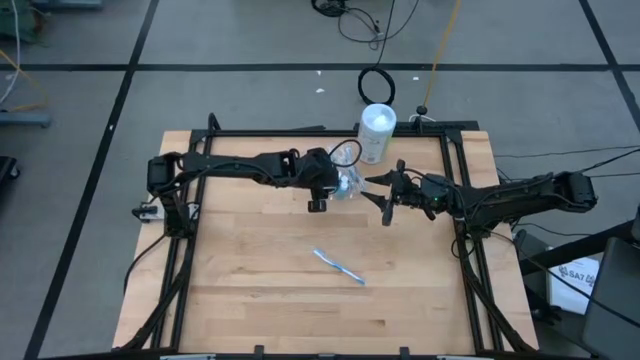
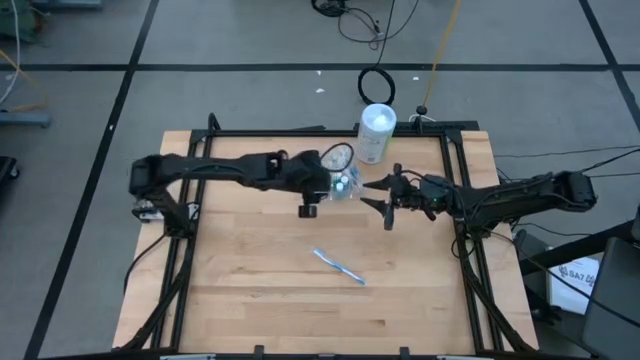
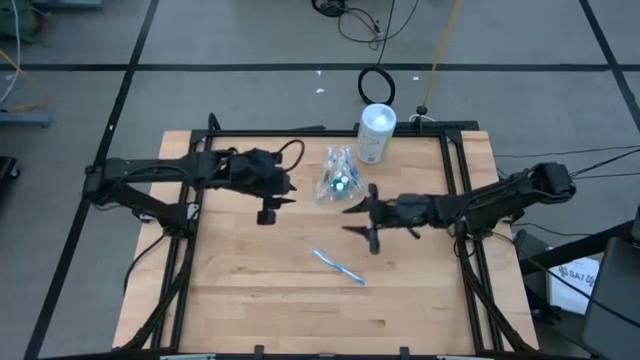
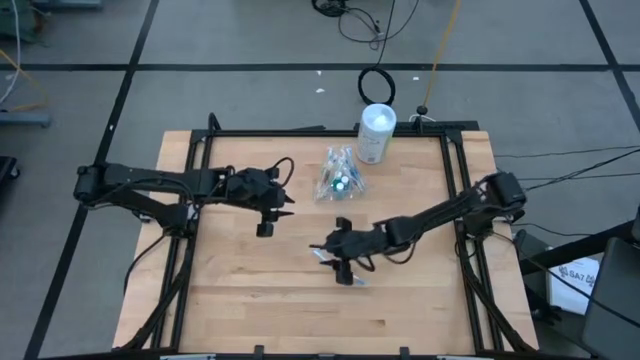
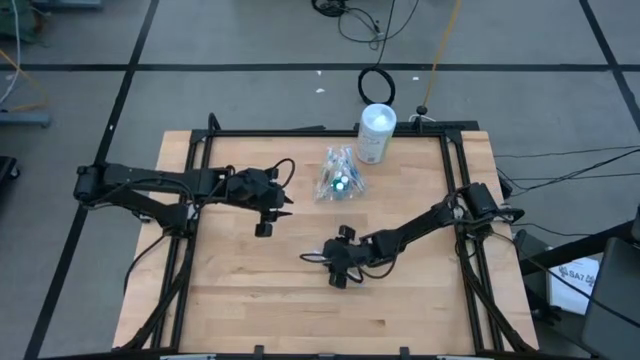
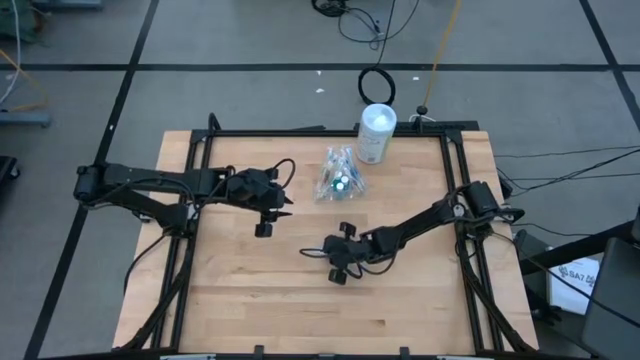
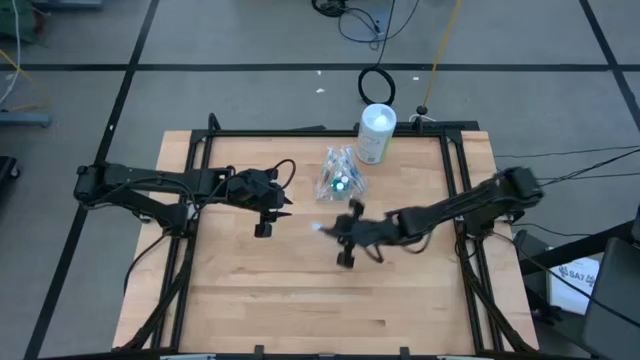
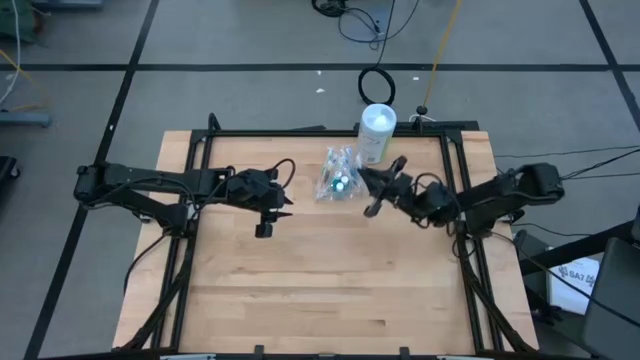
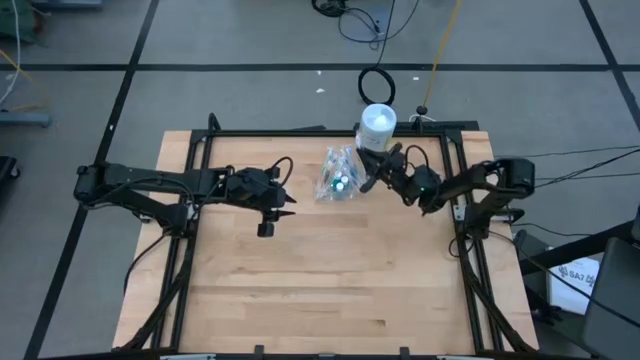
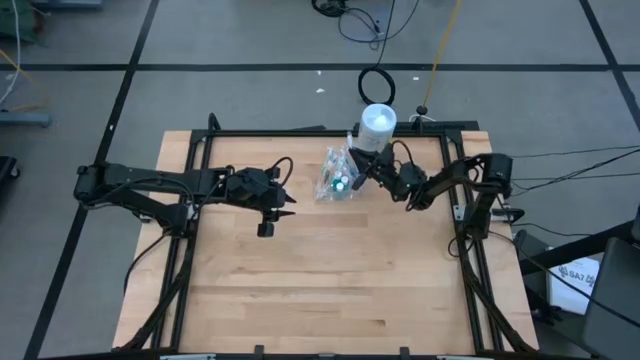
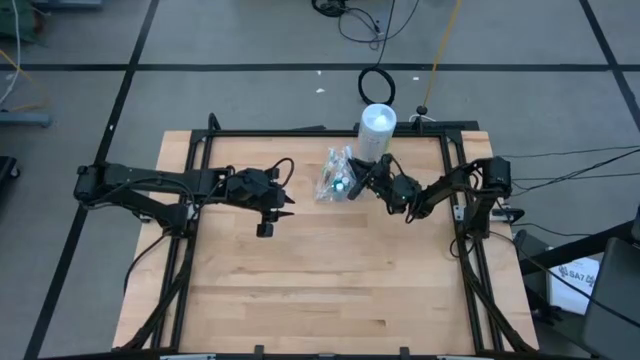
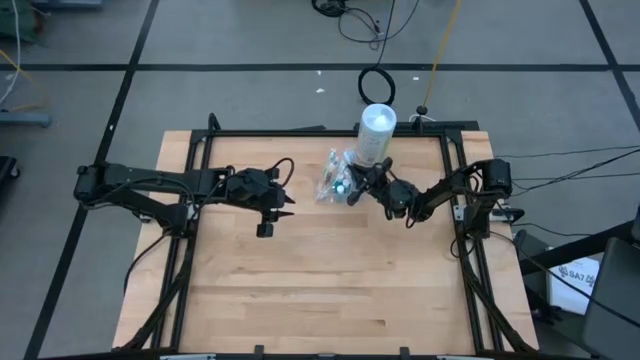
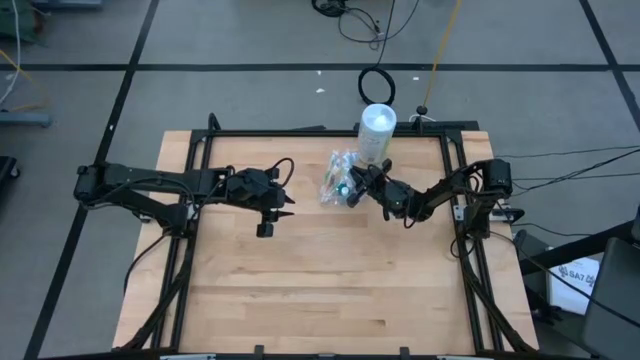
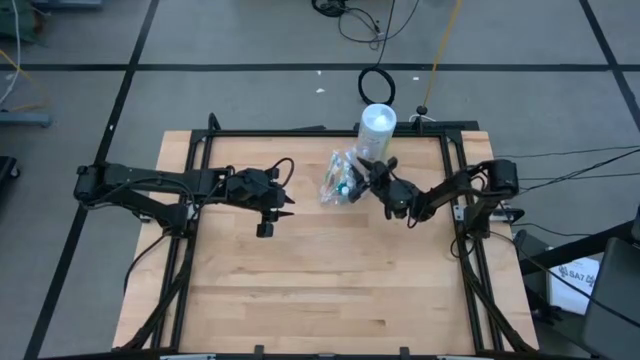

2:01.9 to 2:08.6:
Task: Pick & Place toothbrushing station
Put the blue toothbrush into the transparent organizer

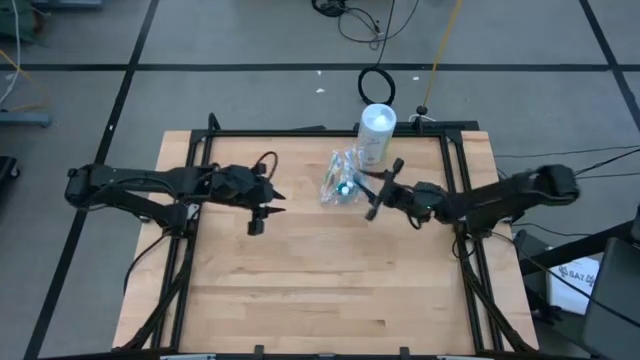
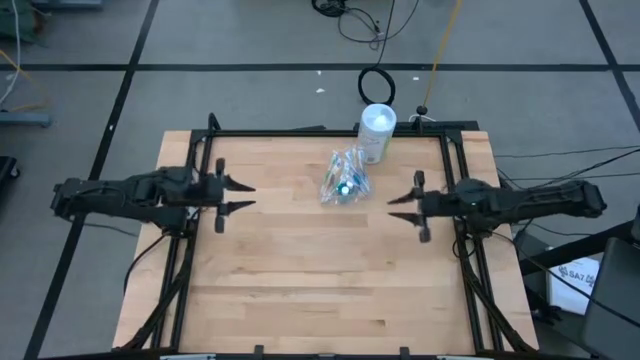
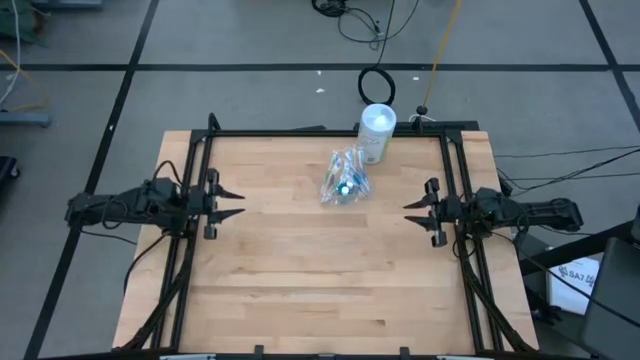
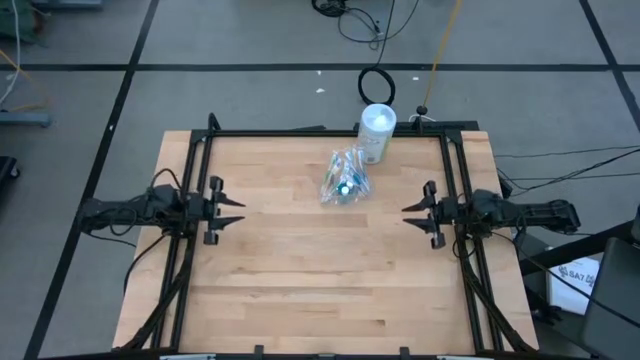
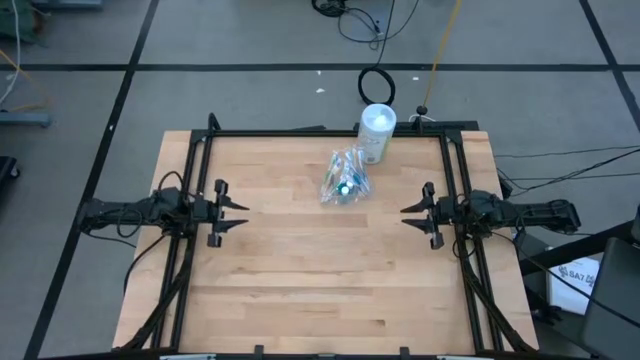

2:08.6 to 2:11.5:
Return to Home Position

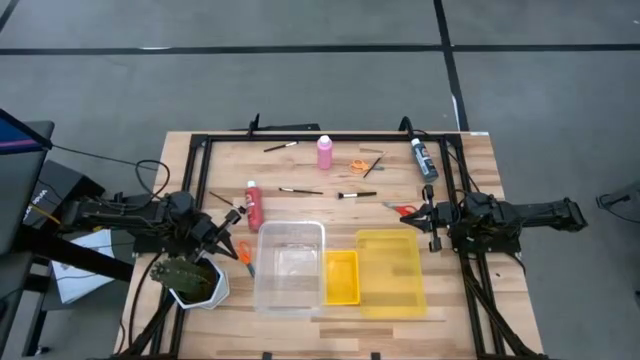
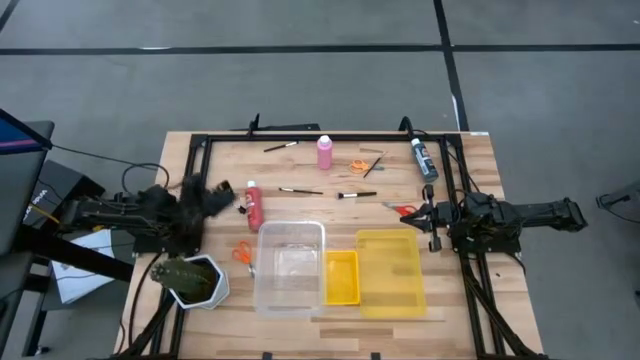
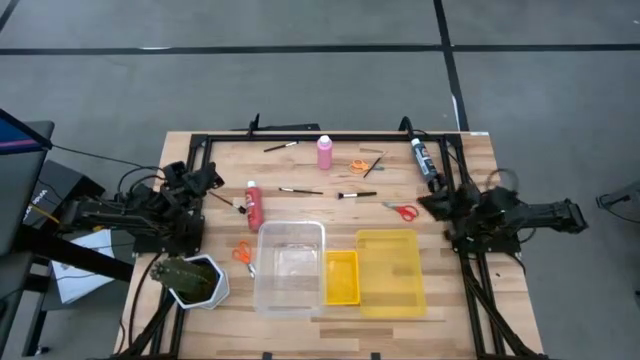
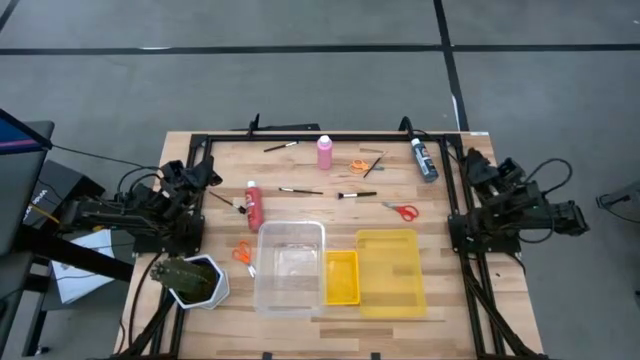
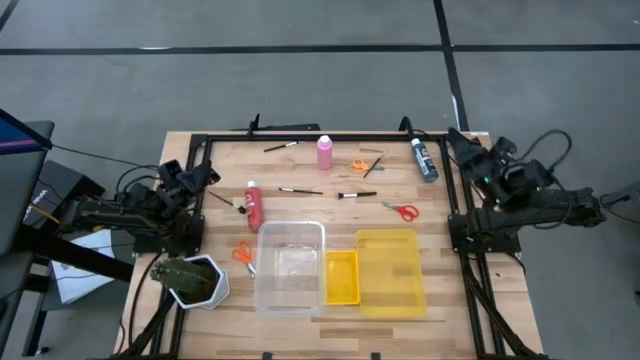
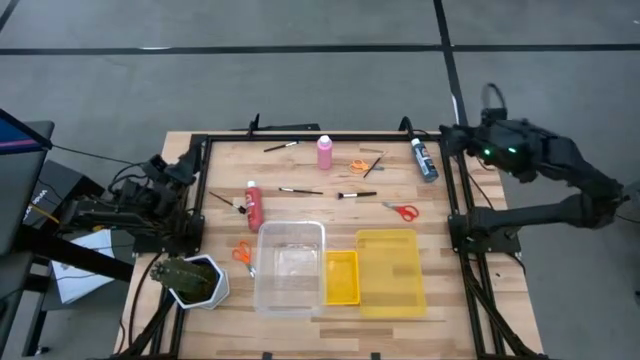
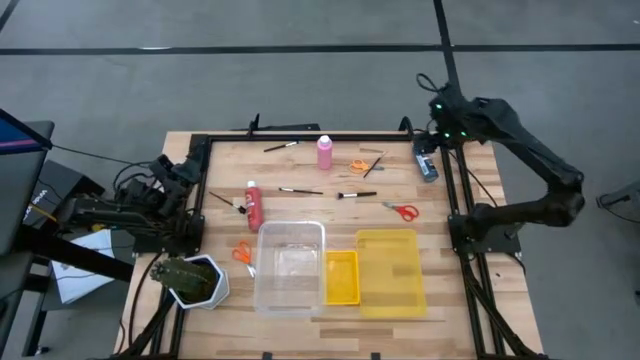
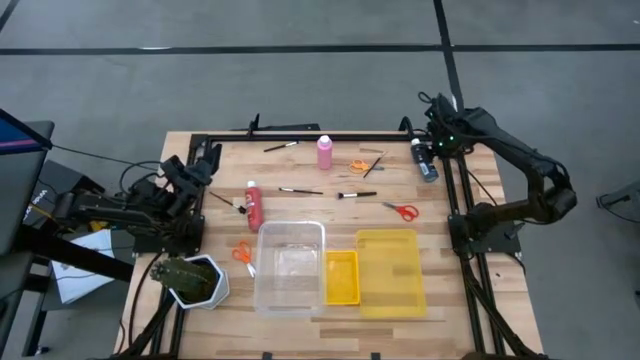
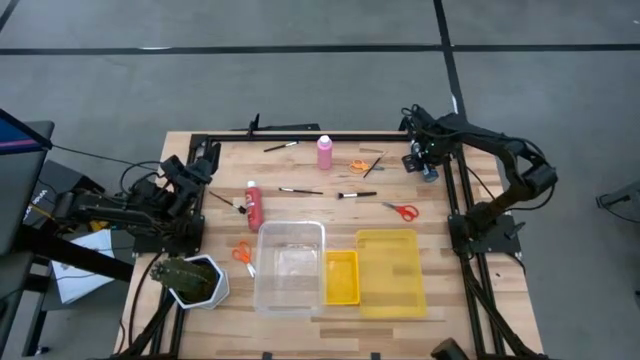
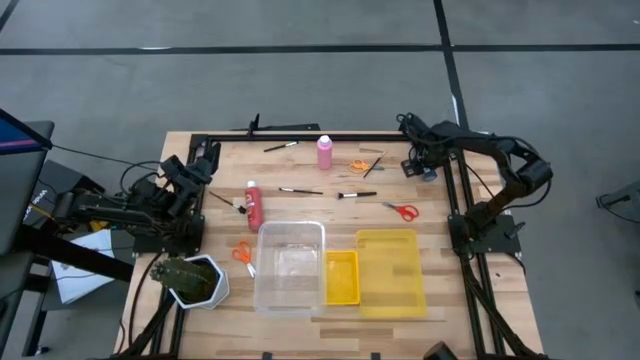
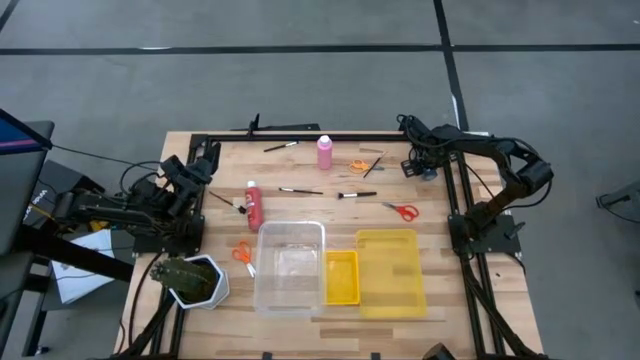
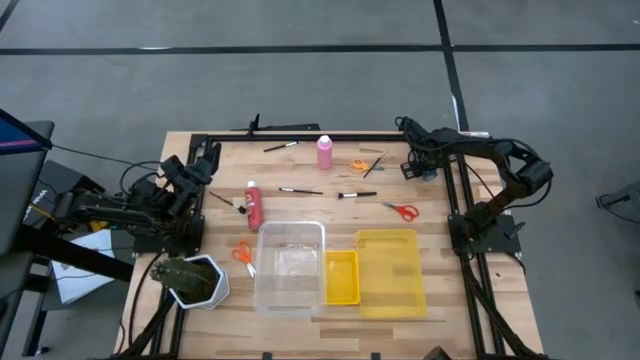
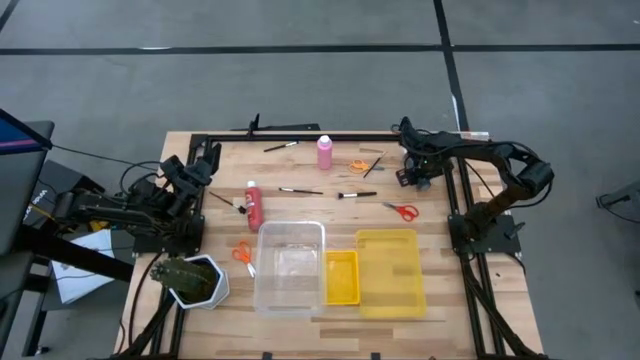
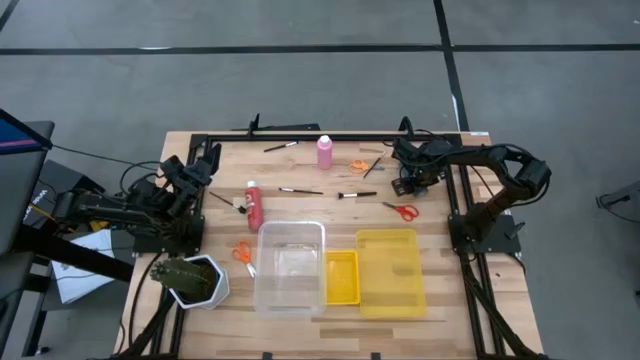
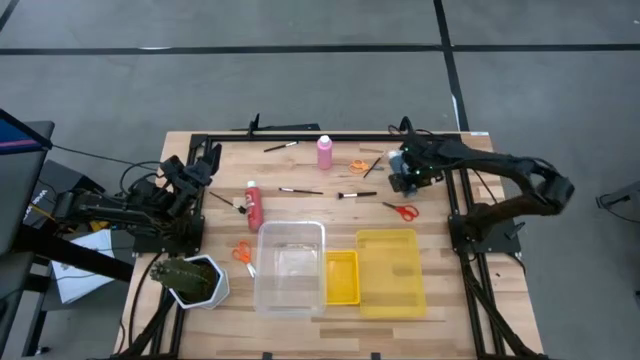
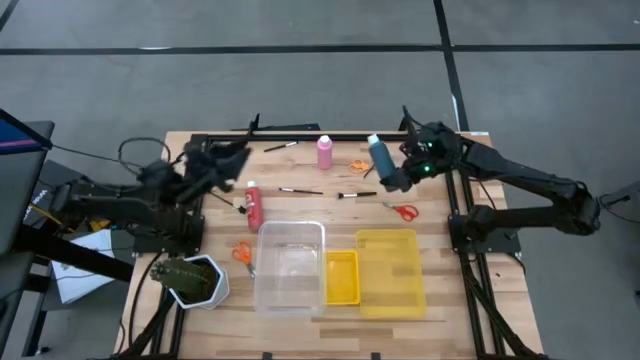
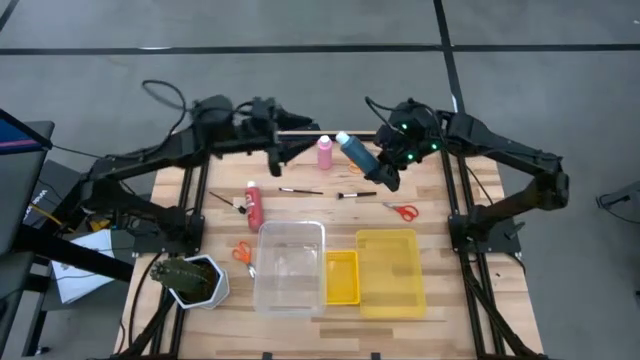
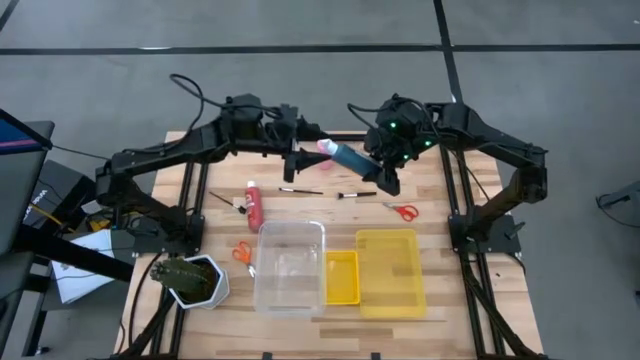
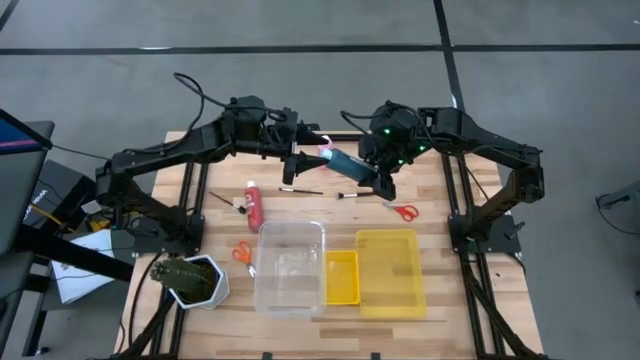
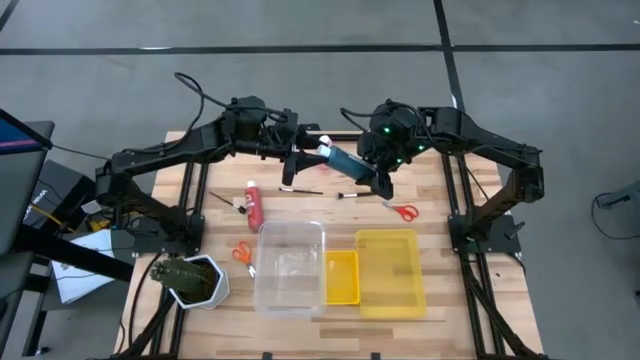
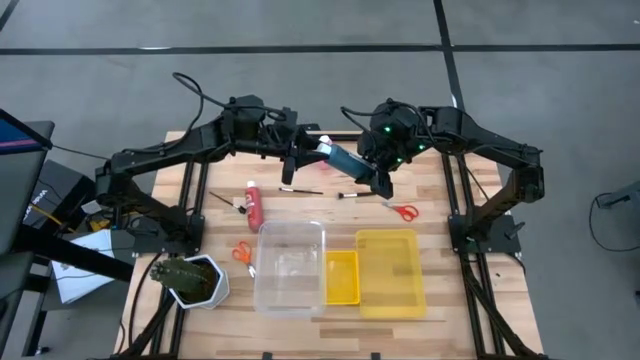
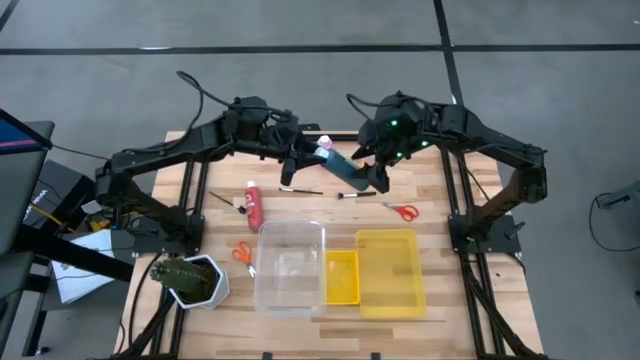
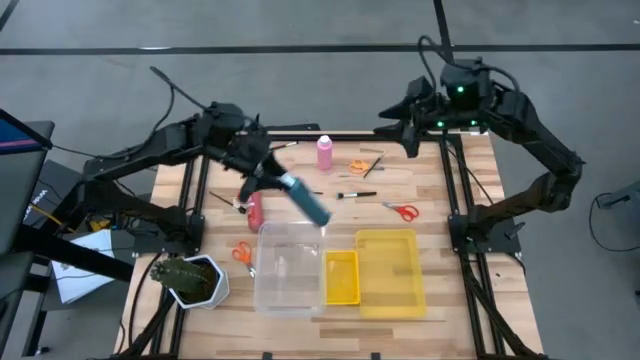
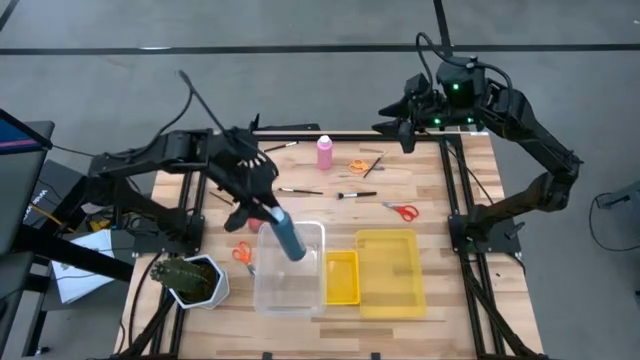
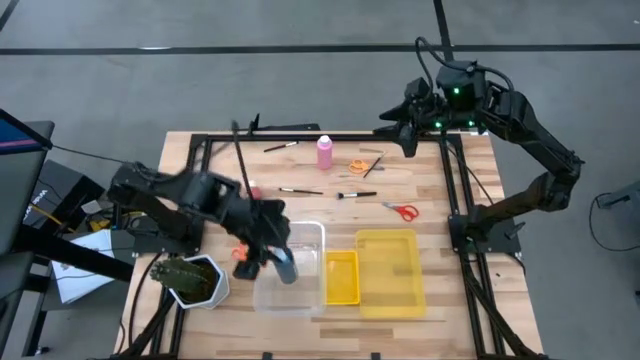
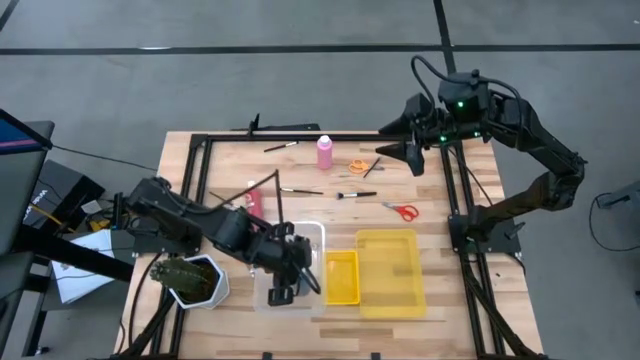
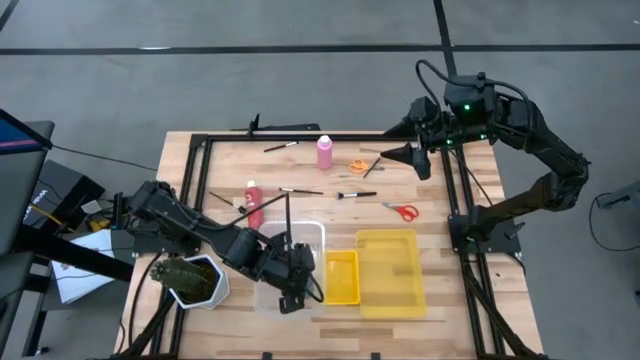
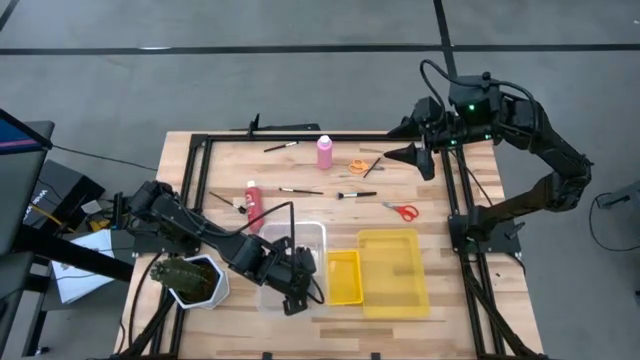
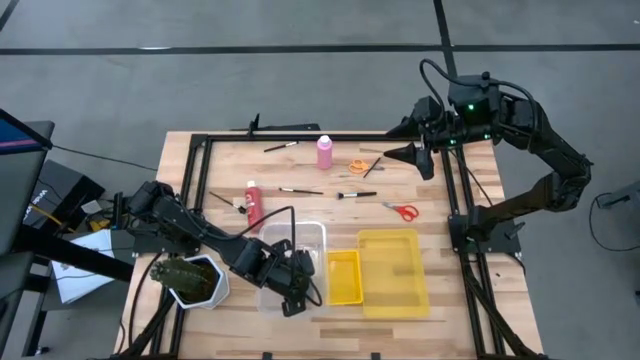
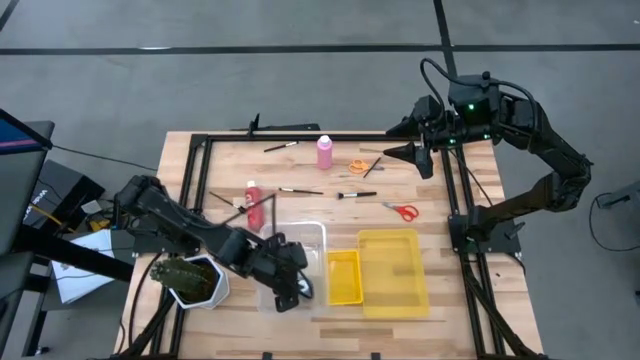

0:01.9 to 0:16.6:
Task: Pick & Place Paint Supplies
Put the black paint bottle into the transparent bin
